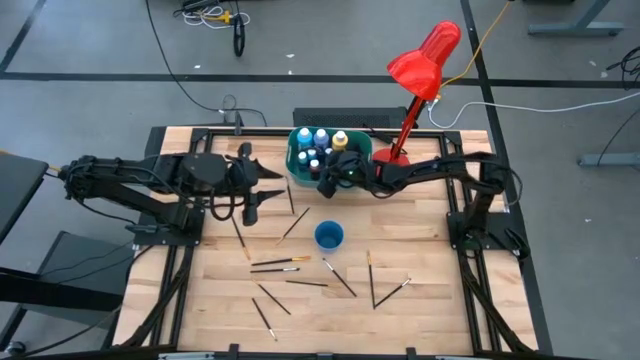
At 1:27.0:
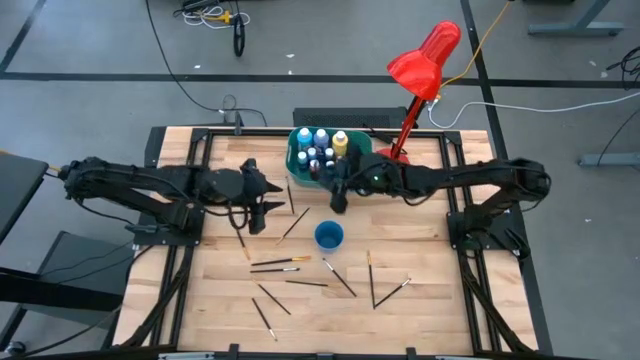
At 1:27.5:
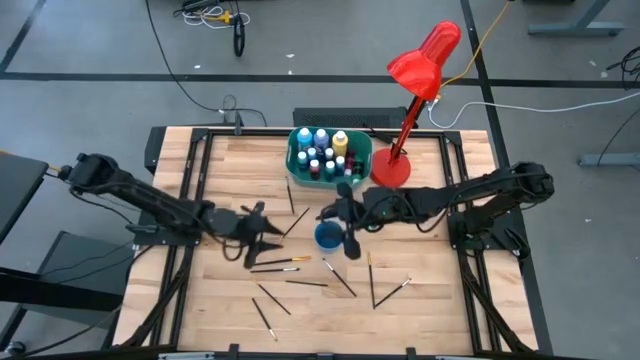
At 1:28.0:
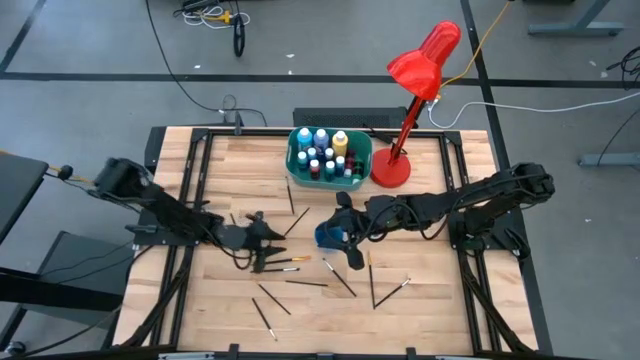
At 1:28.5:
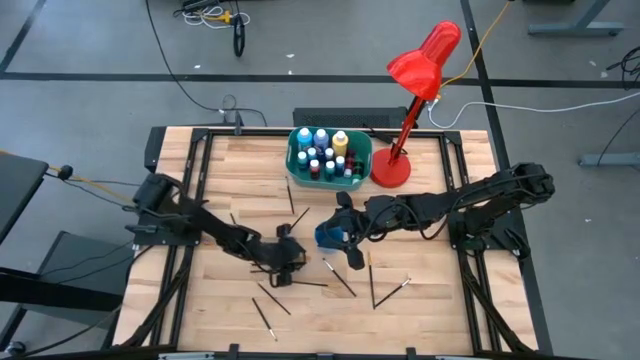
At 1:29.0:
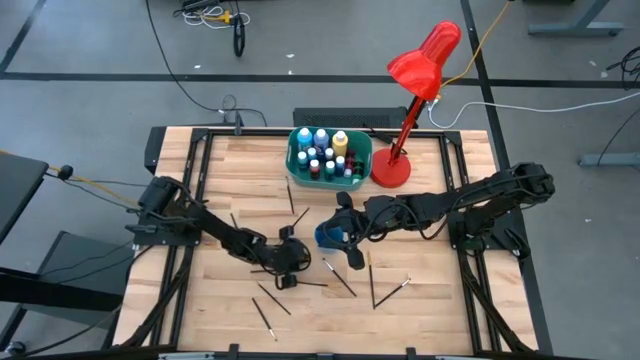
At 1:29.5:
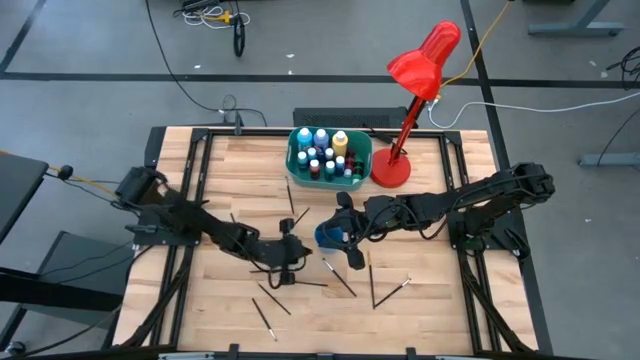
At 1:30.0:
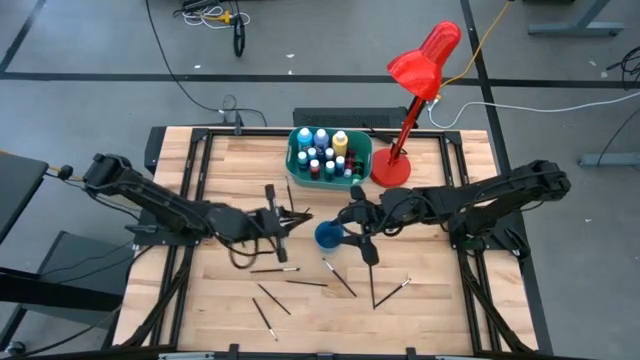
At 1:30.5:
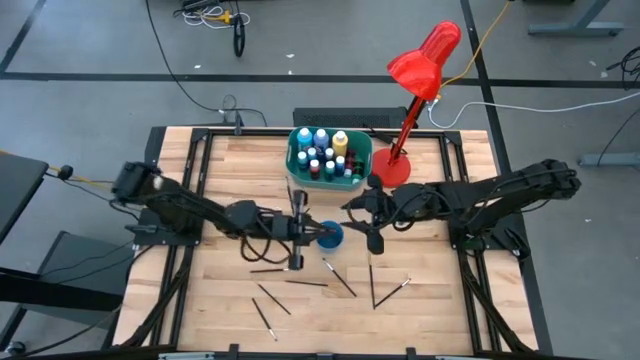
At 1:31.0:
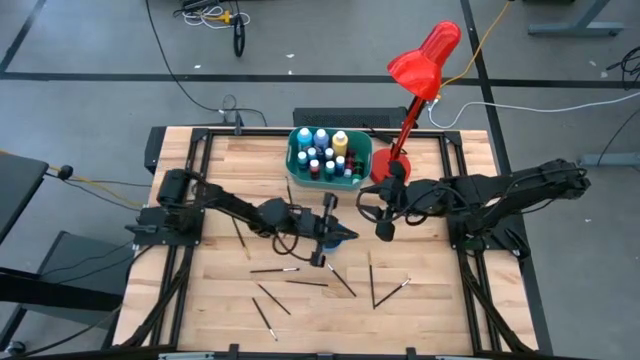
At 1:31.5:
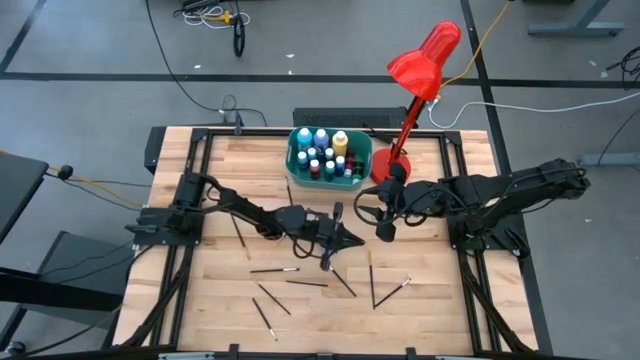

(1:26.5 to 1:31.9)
Task: Pick & Place Paint Supplies
Put the gold paint brush into the blue cup

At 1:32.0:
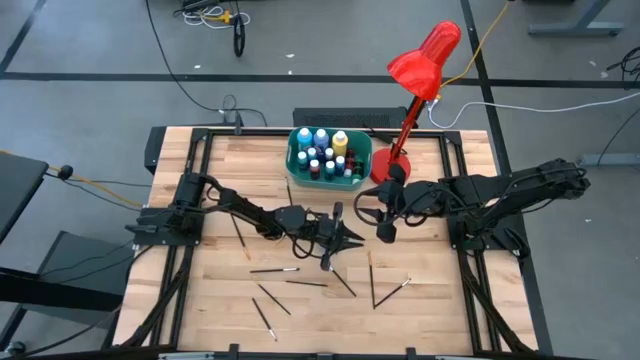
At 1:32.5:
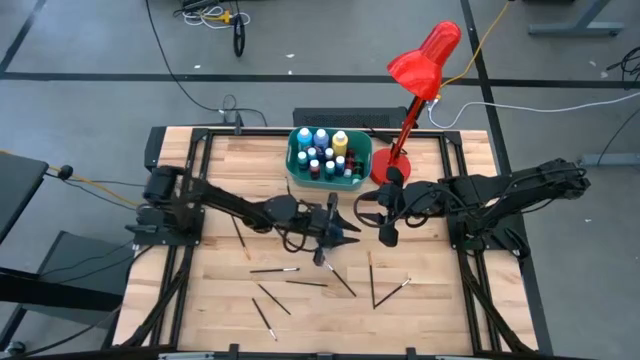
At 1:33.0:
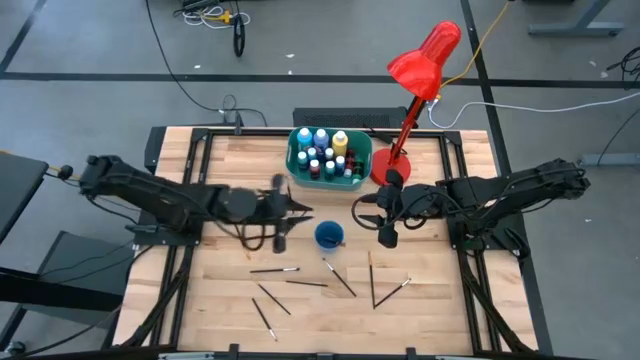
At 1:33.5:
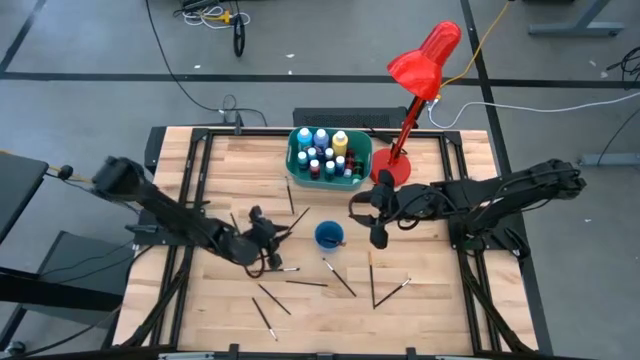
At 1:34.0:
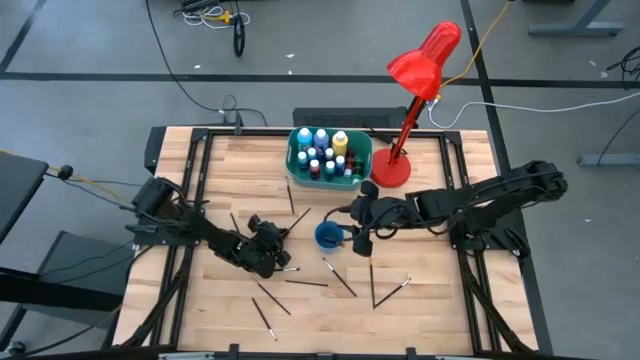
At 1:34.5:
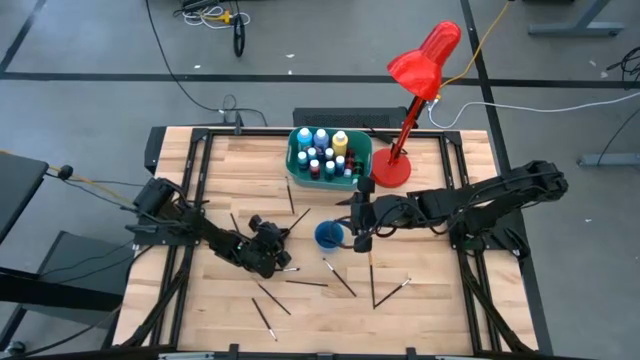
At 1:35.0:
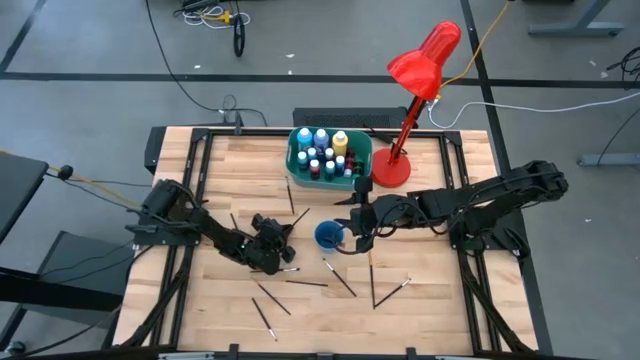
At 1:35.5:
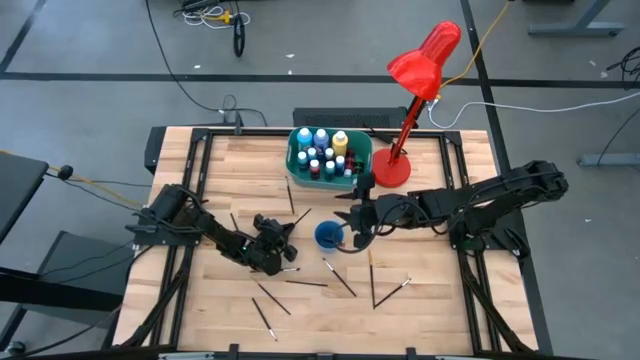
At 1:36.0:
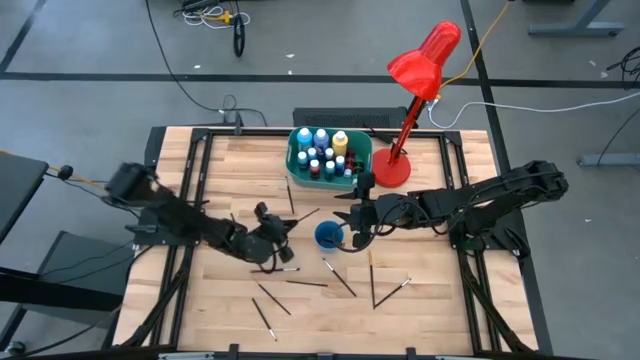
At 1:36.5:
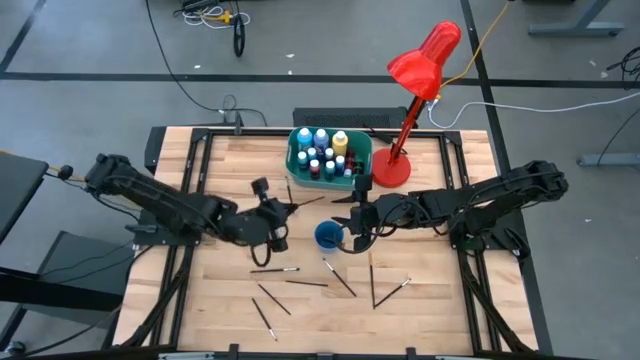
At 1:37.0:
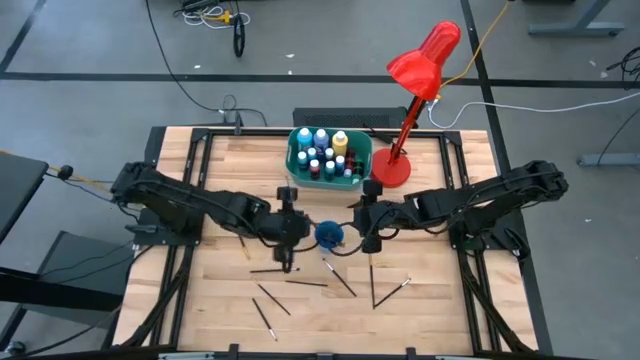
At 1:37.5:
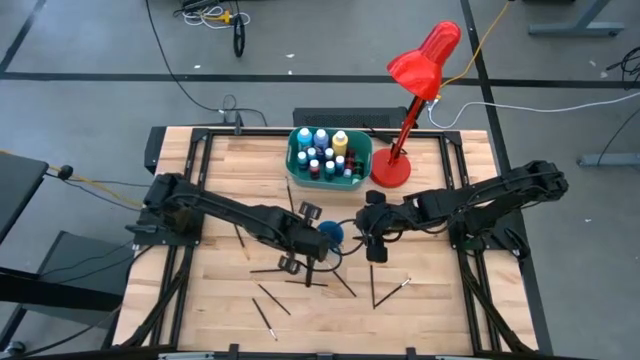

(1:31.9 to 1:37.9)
Put the gold paint brush into the blue cup

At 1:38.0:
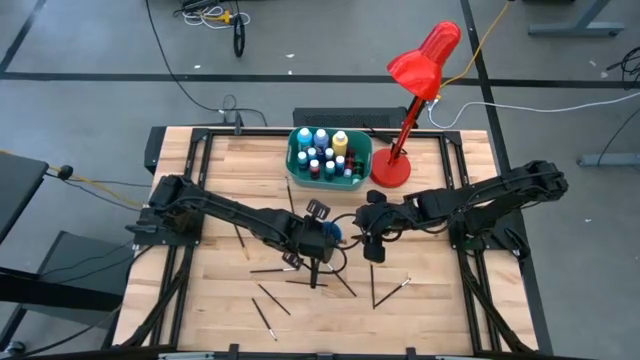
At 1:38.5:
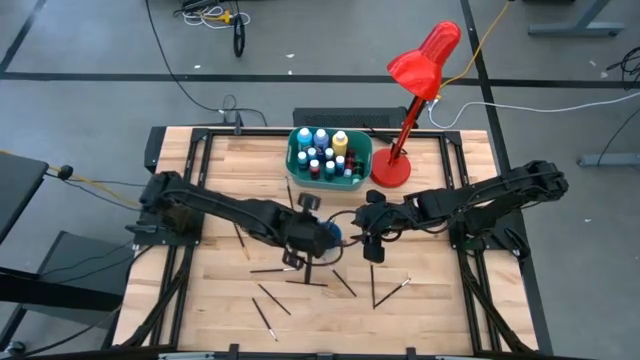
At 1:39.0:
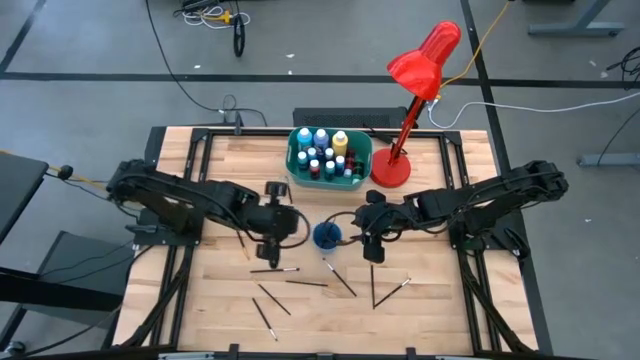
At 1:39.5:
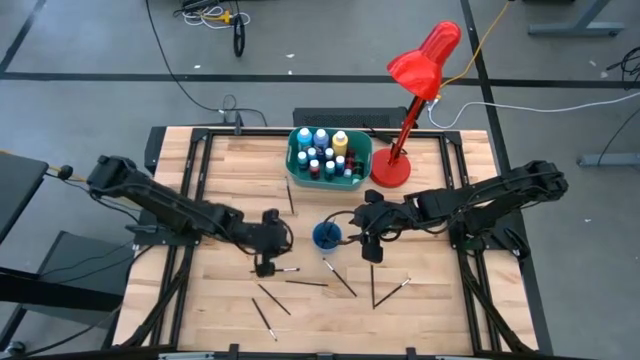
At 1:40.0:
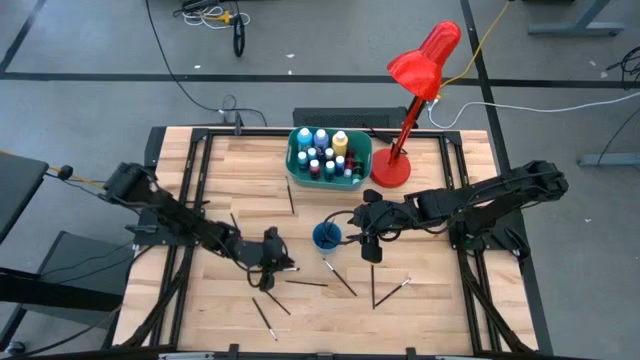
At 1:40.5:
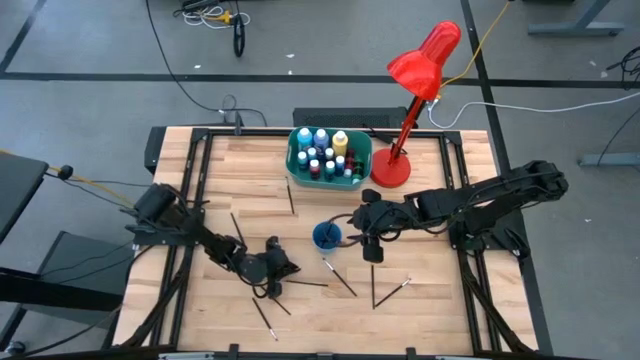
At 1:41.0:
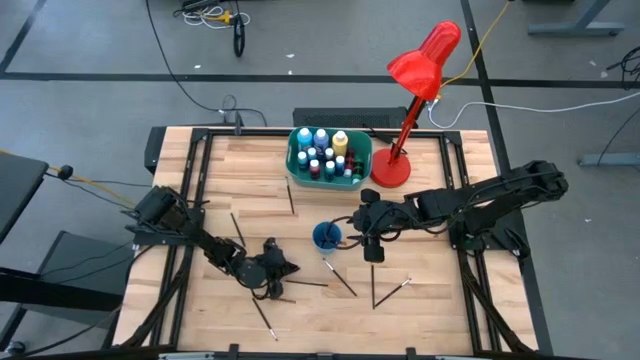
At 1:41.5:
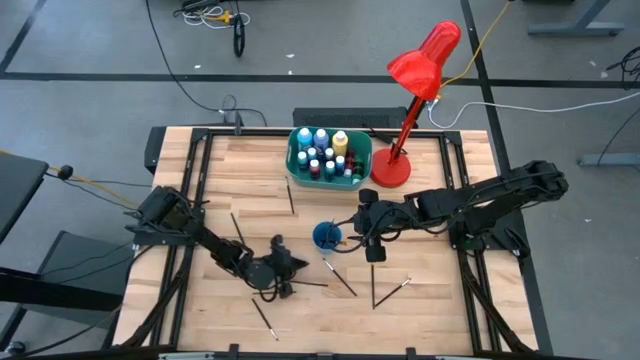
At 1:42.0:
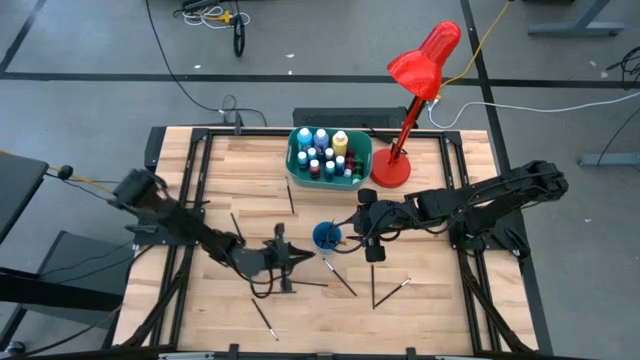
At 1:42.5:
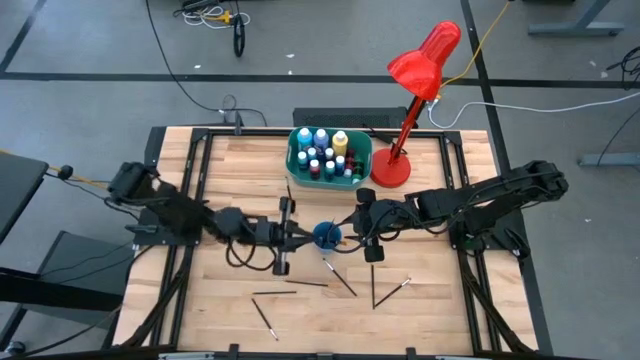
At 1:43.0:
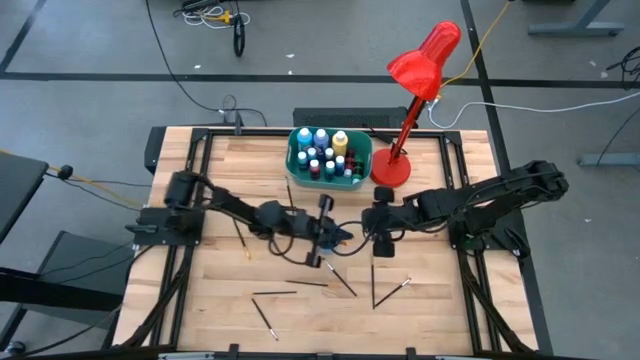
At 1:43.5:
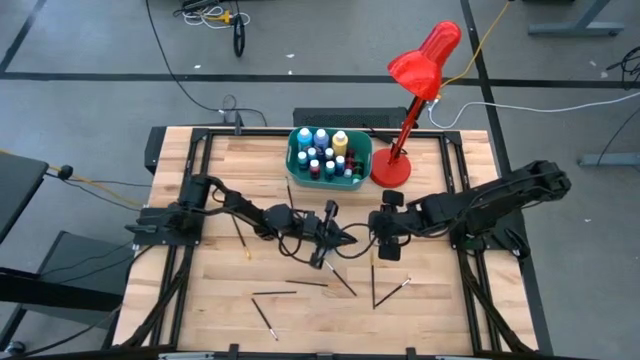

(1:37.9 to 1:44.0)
Put the silver paint brush into the blue cup
